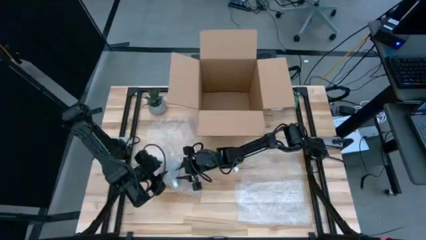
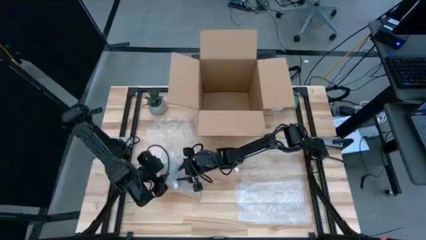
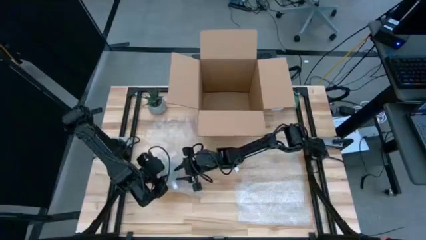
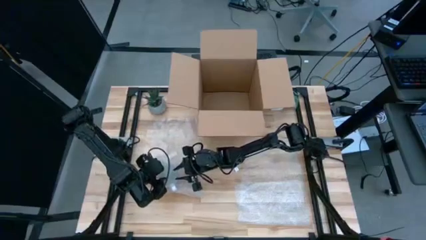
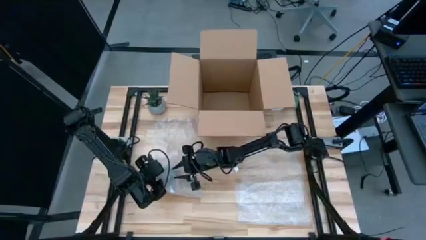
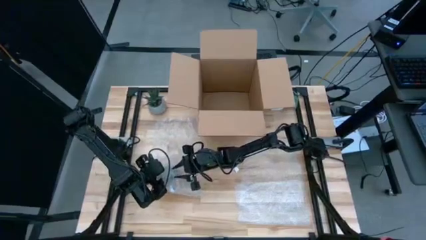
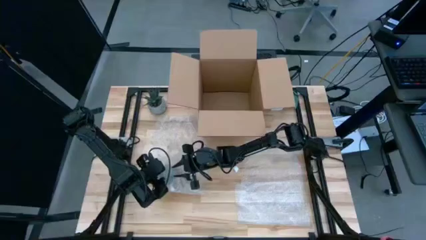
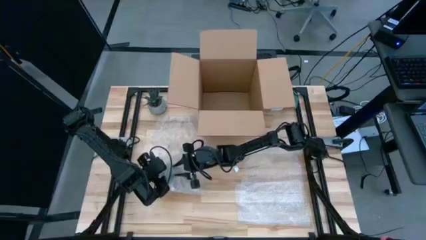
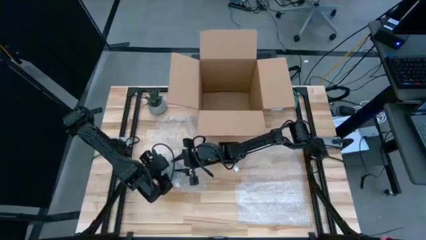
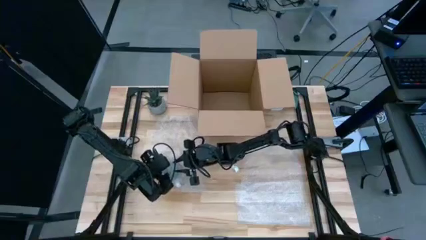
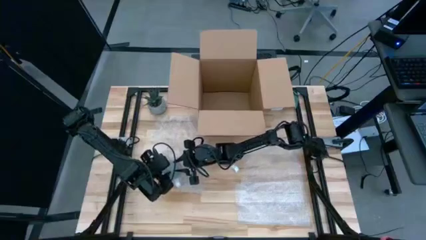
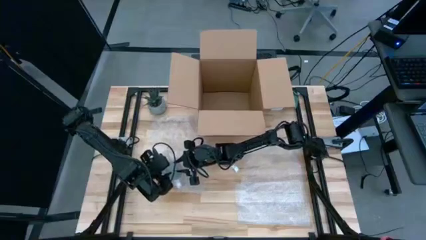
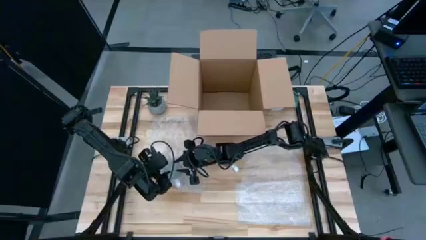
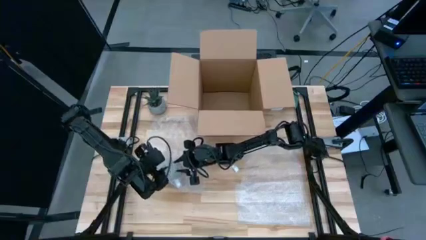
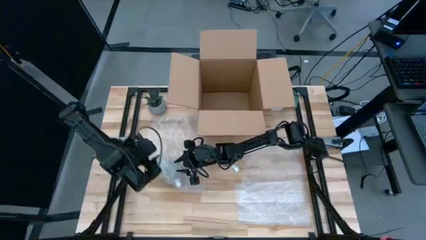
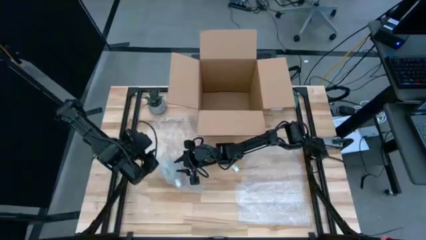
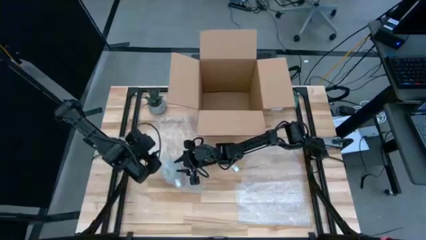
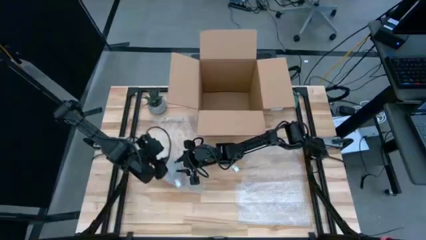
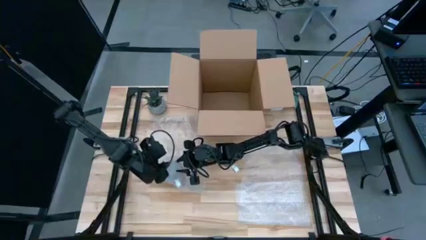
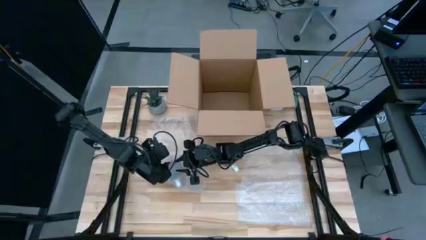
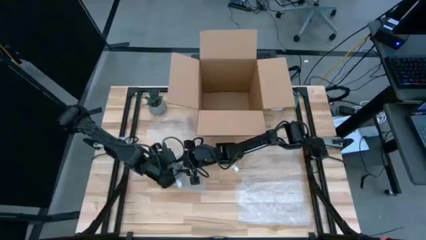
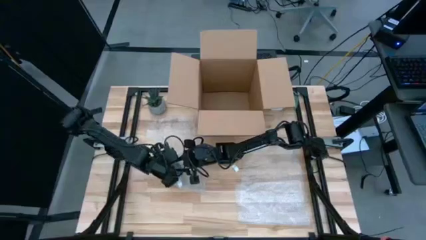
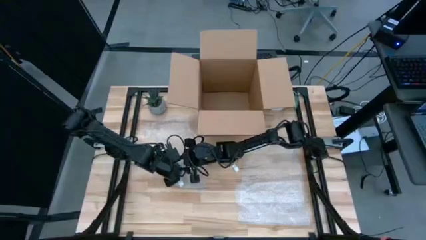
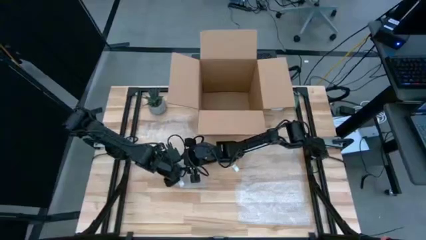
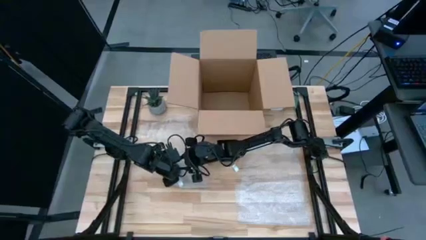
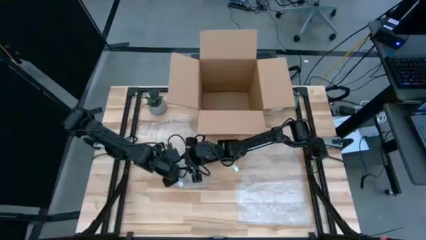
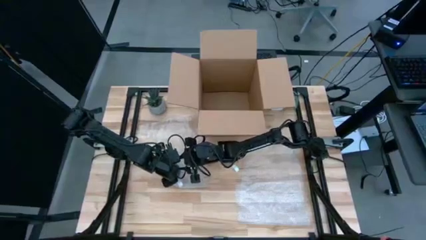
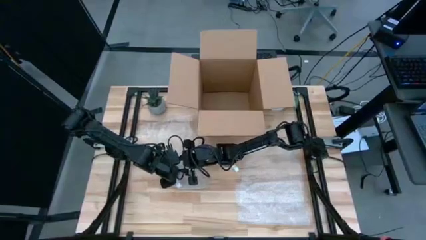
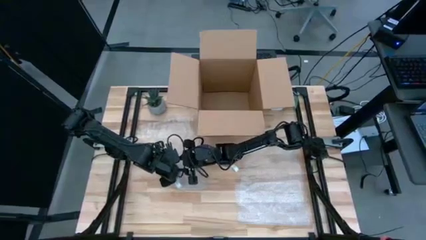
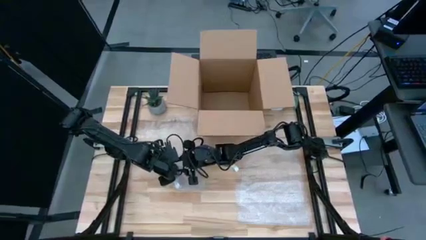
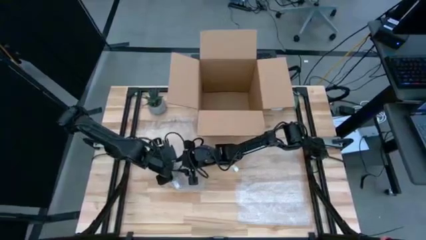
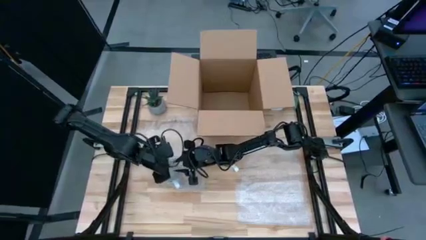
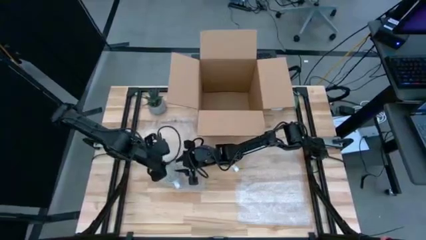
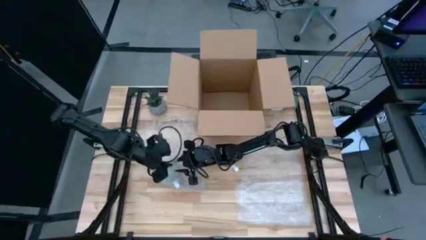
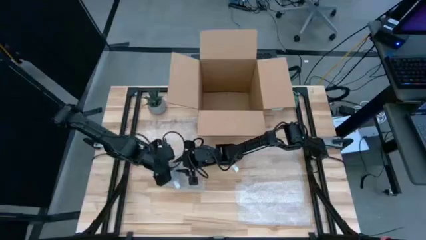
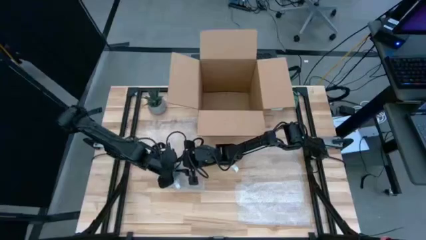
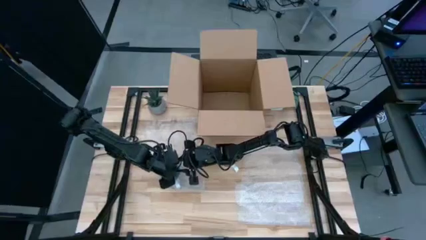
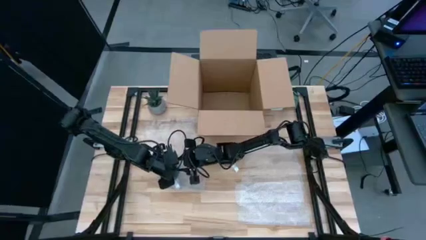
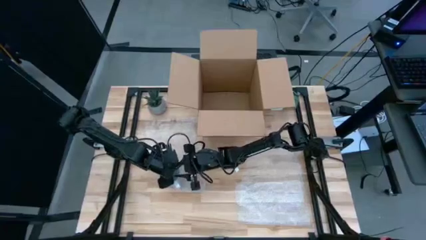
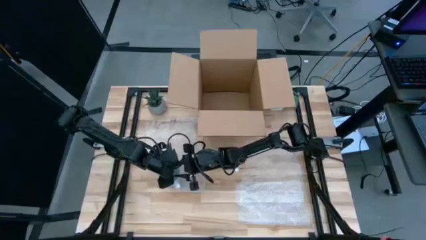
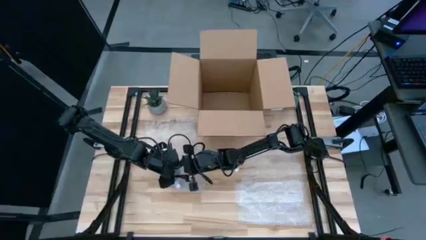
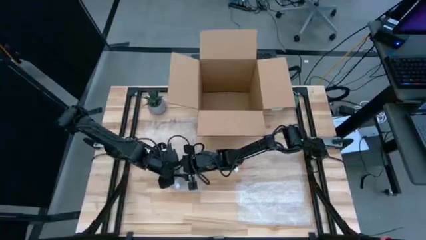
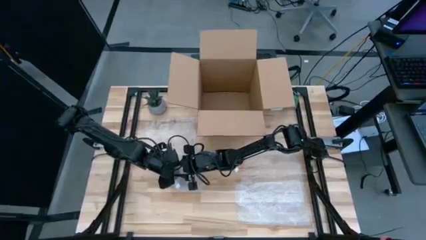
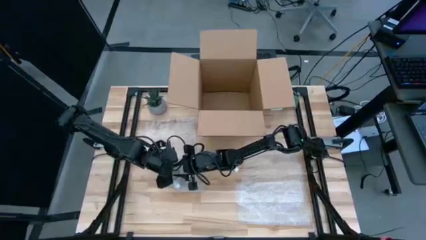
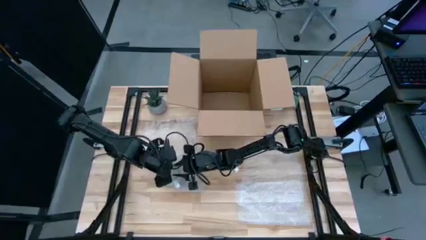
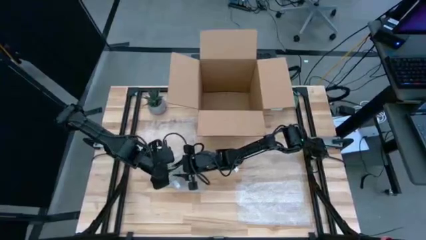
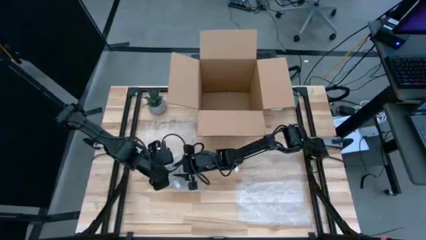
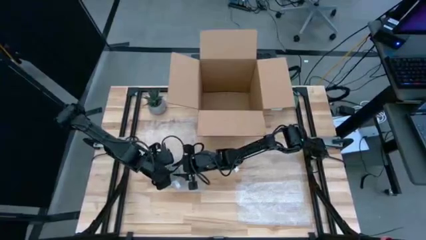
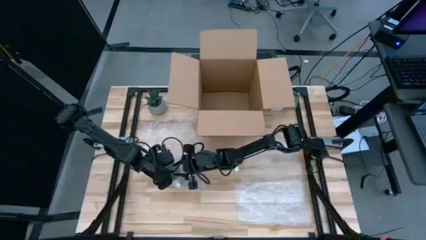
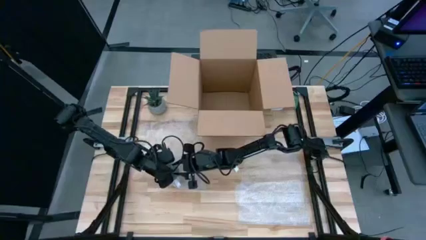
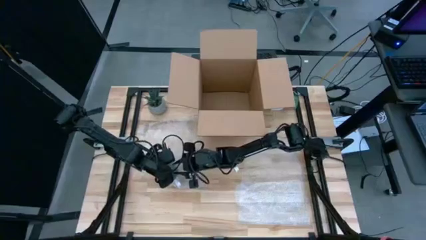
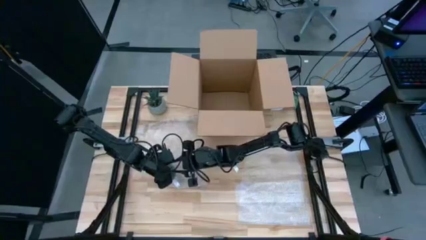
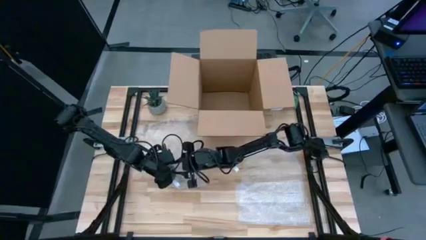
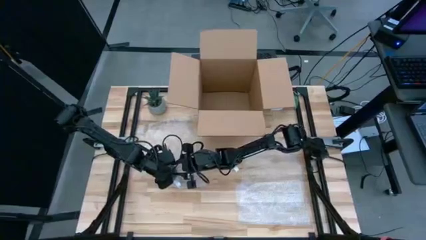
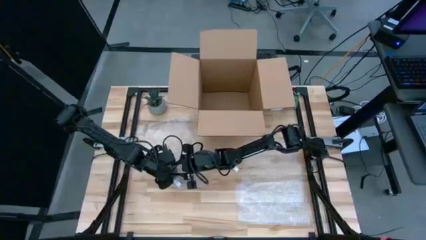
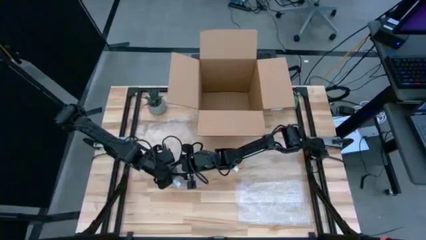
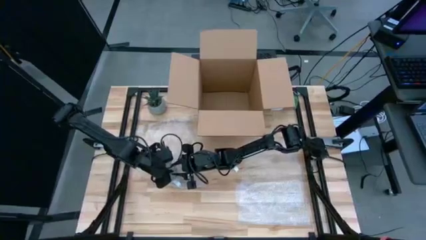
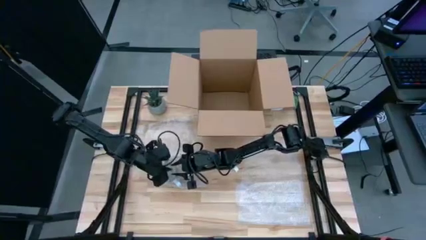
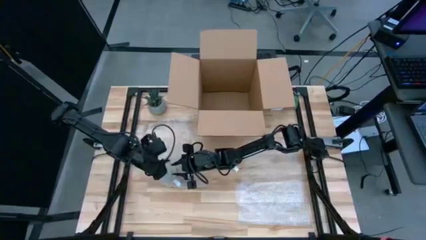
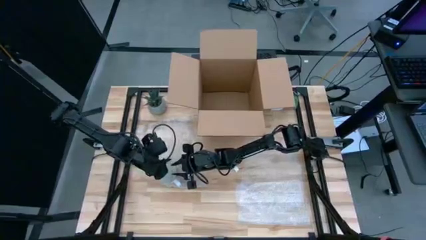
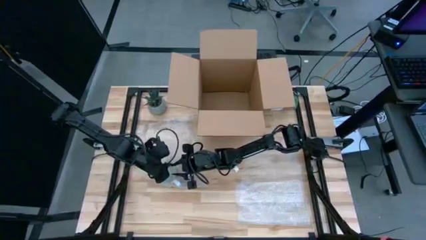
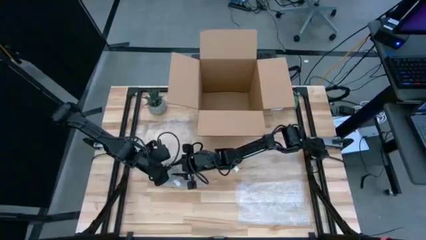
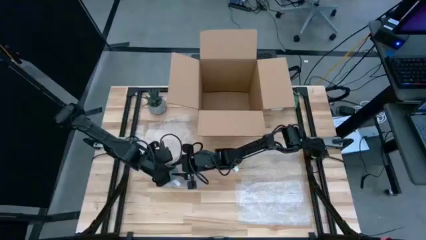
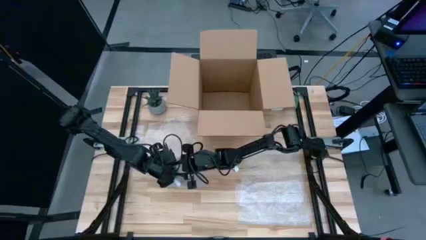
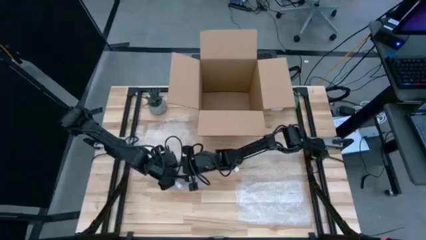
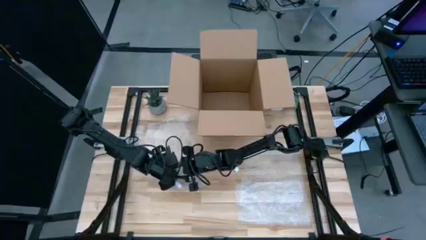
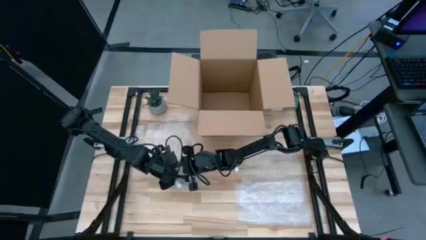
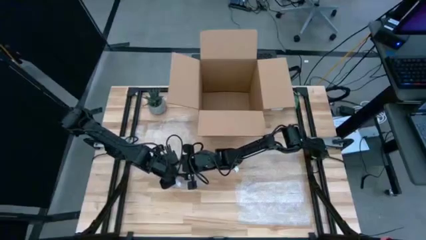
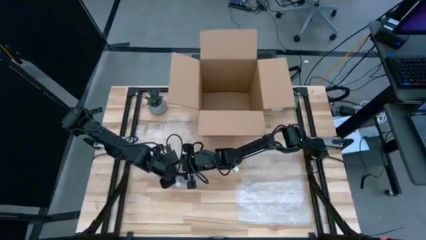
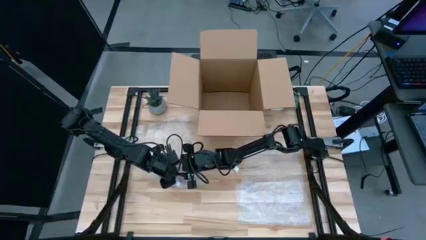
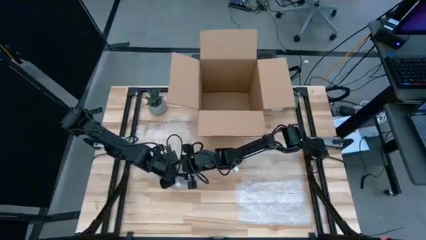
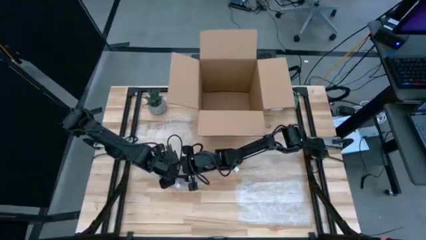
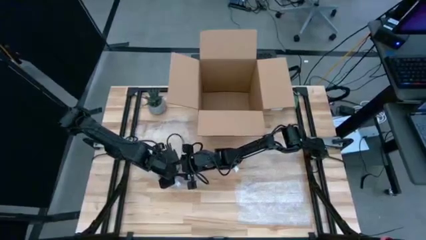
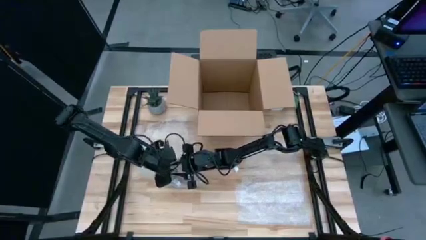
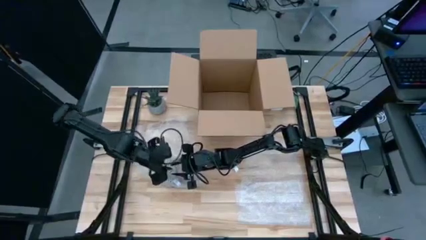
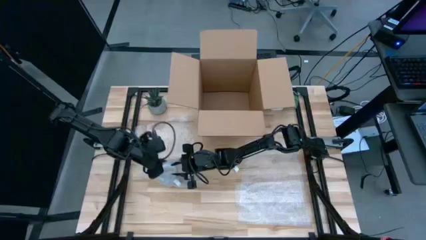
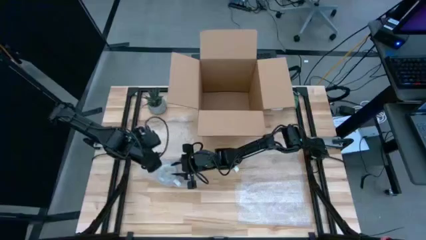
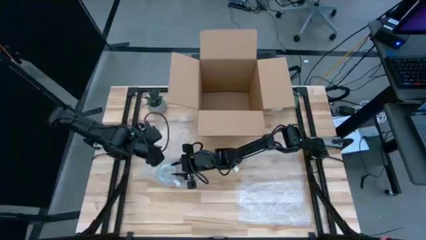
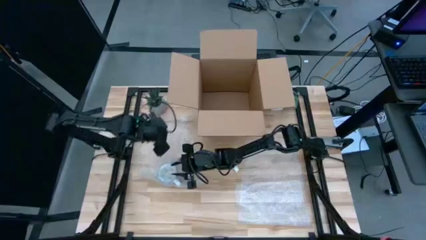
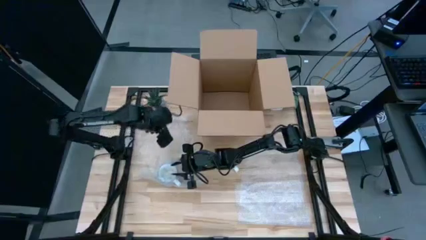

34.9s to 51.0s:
Task: wrap mug
Wrap the red mug with the bubble wrap
